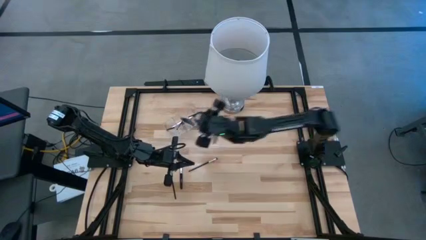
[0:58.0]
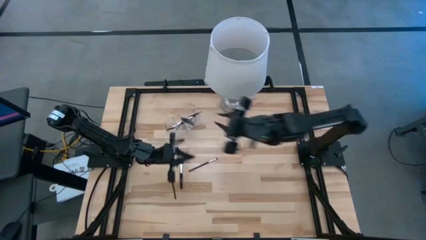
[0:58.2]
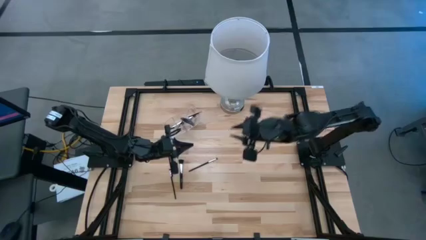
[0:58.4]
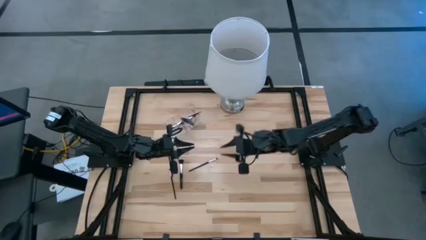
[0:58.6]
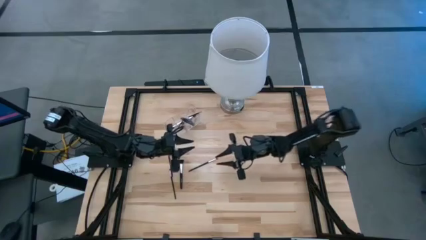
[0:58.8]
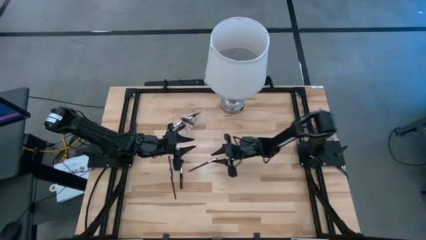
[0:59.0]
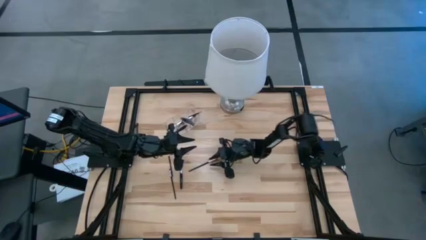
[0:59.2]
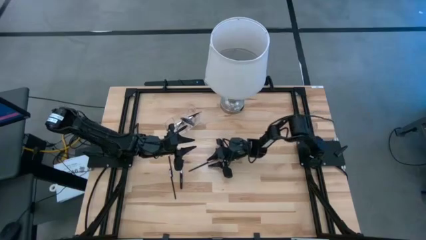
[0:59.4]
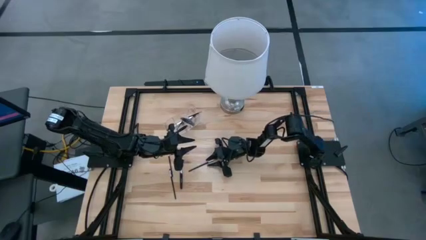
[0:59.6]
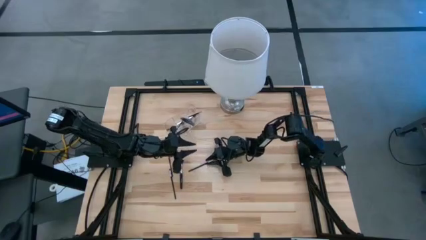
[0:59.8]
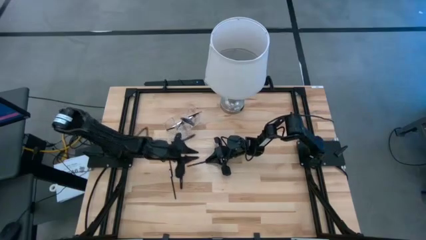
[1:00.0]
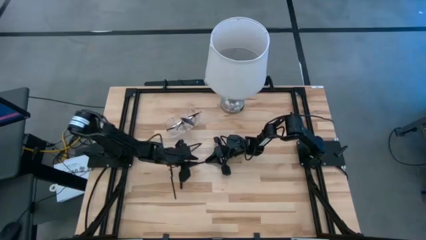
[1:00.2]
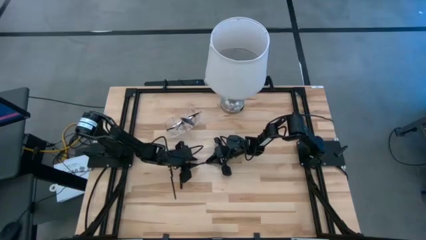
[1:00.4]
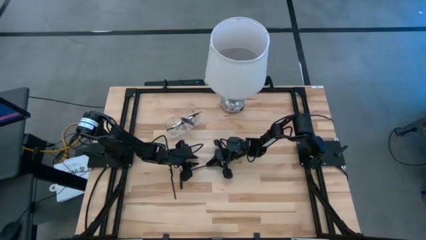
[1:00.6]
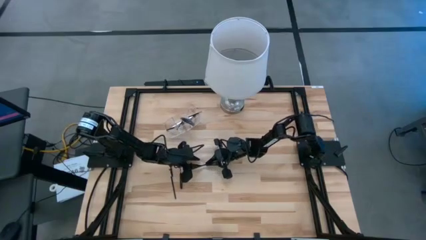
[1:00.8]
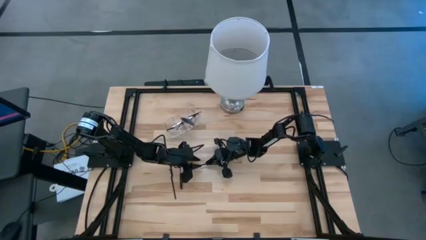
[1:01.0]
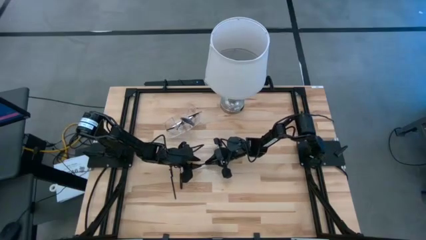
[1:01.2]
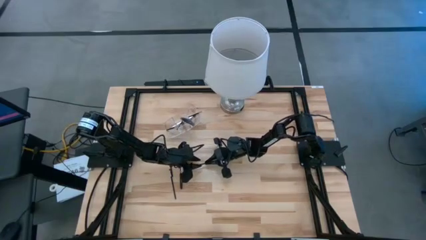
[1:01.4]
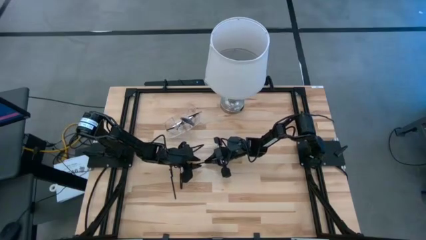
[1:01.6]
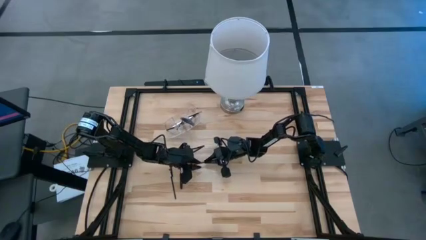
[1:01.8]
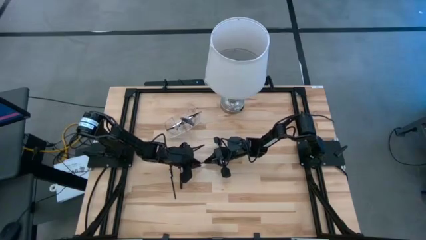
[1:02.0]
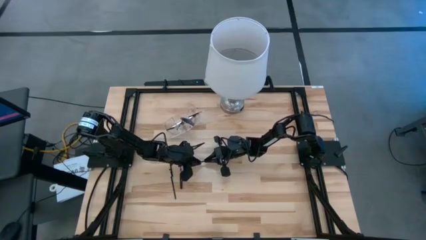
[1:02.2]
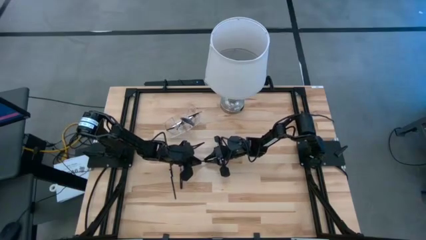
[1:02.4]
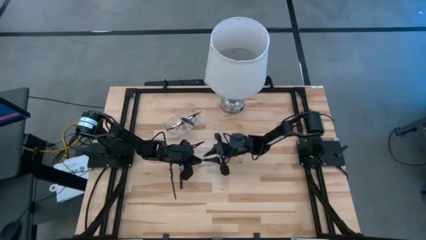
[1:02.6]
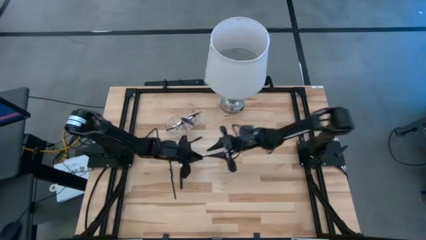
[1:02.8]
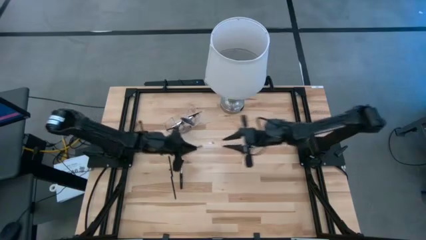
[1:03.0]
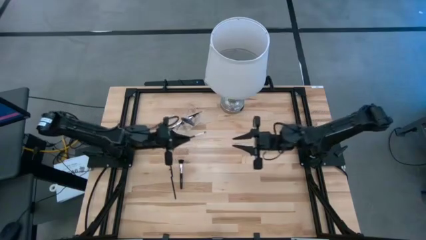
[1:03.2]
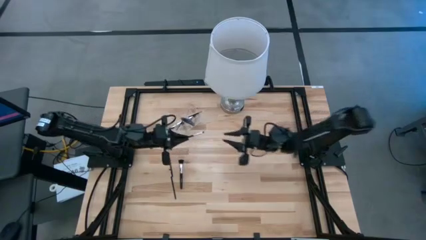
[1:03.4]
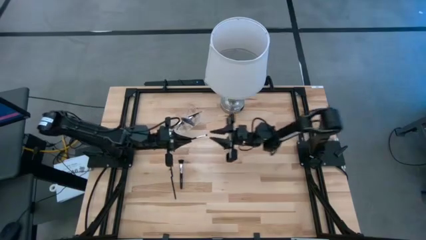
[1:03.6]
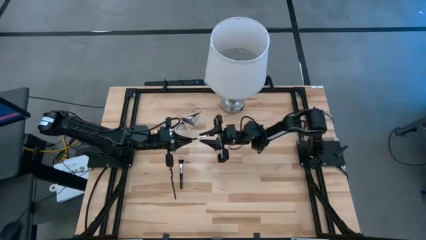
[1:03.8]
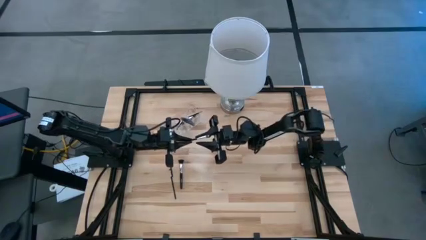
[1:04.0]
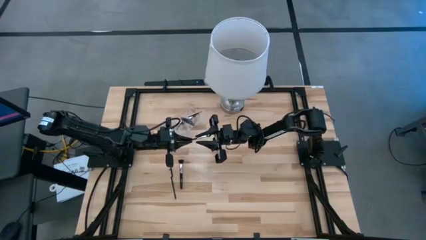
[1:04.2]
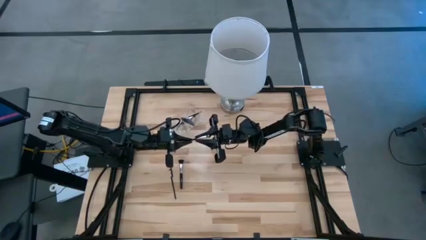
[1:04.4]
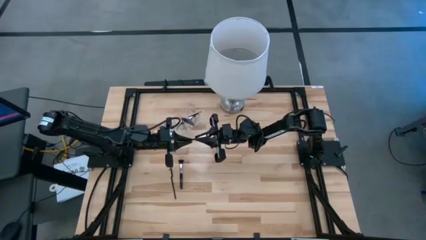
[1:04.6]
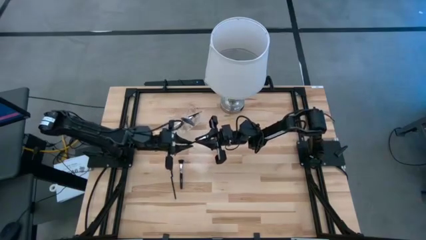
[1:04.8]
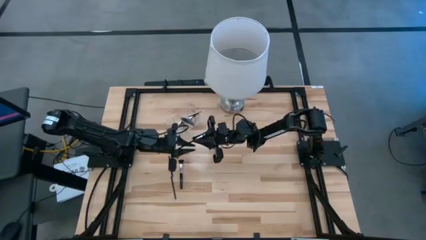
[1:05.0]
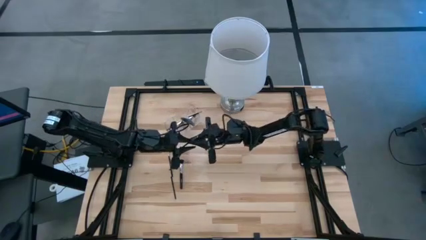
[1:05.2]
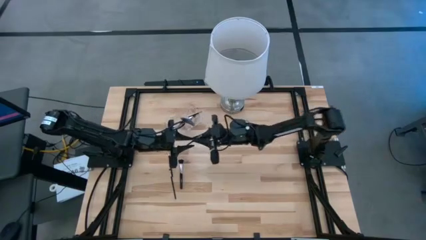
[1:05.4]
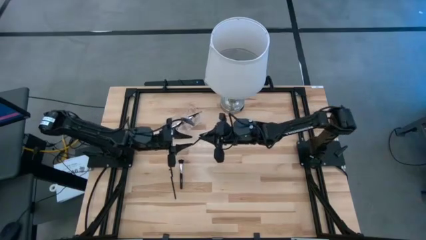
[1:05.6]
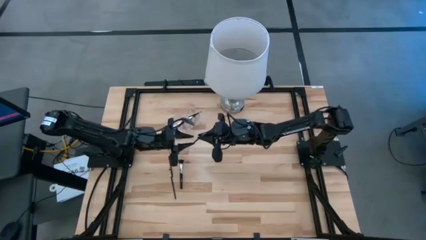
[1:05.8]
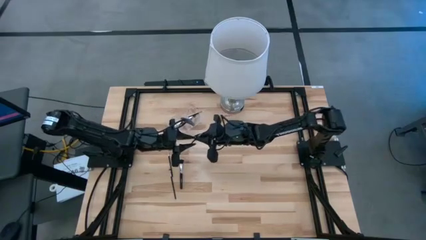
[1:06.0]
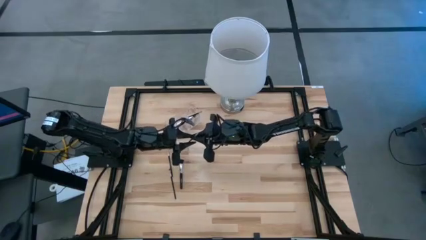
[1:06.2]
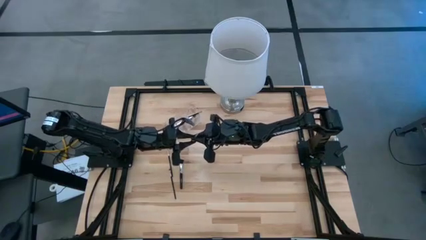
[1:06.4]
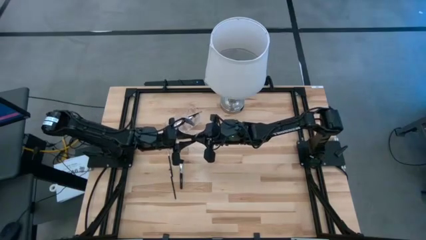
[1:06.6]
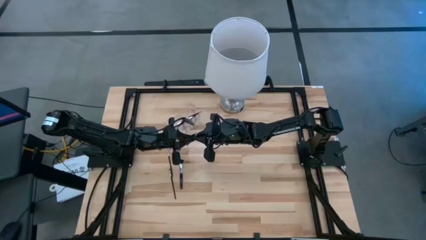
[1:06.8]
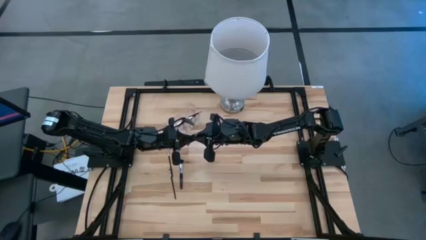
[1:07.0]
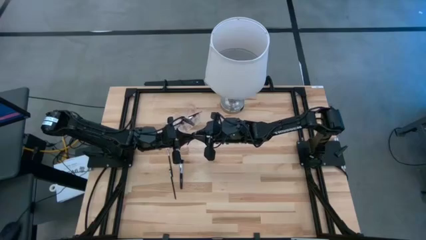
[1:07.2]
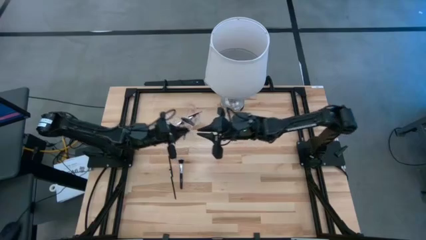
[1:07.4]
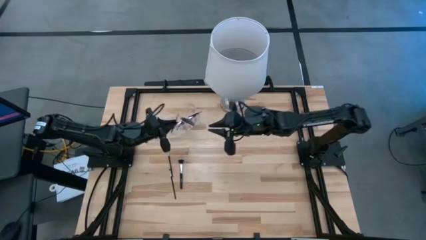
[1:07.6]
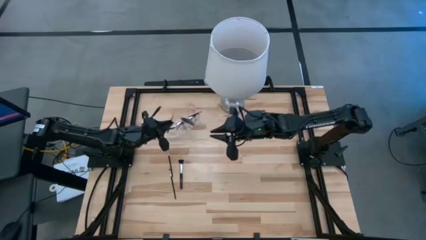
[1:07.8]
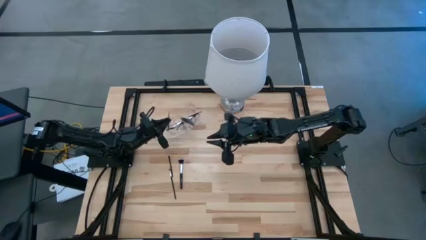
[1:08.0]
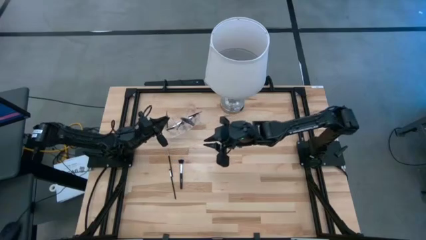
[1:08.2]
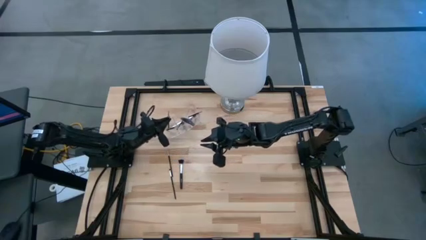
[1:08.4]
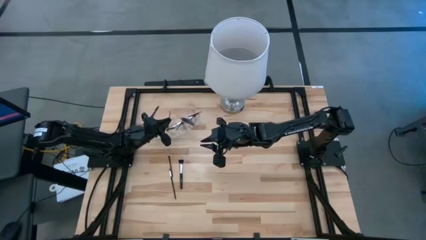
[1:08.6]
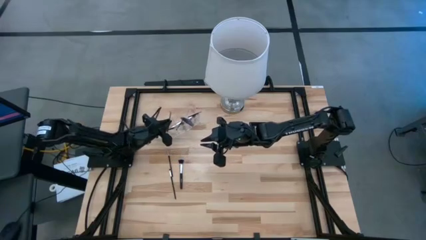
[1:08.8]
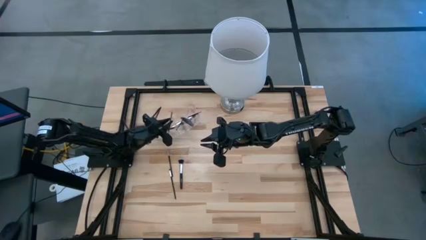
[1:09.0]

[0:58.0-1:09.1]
Task: Put items in baskets/containers
Put the black eyeshadow brush into the transparent organizer

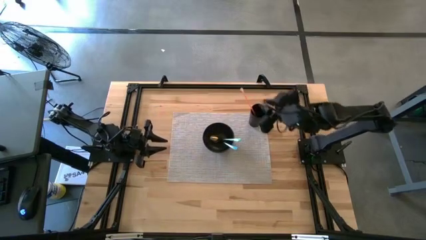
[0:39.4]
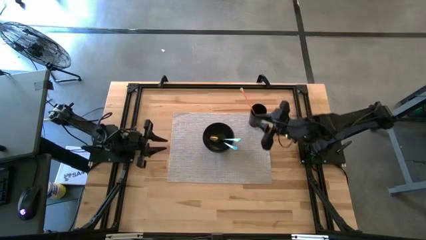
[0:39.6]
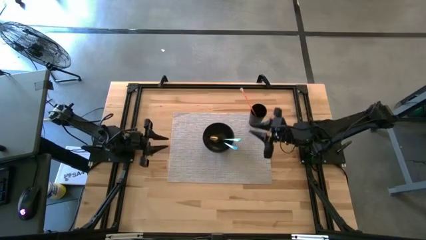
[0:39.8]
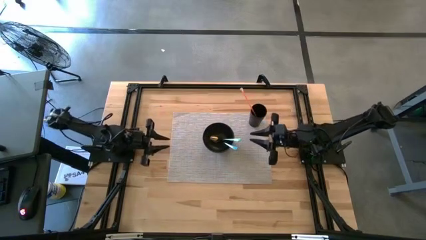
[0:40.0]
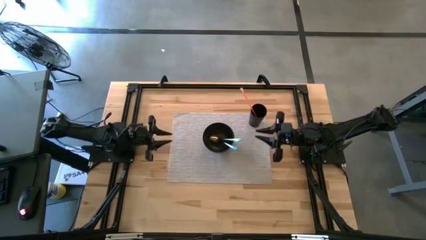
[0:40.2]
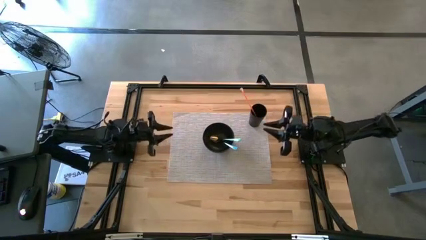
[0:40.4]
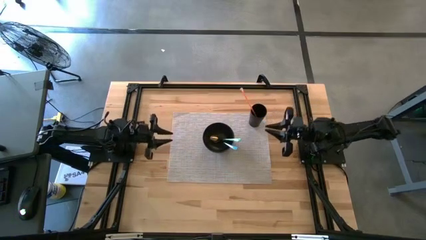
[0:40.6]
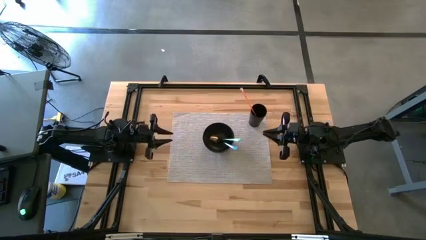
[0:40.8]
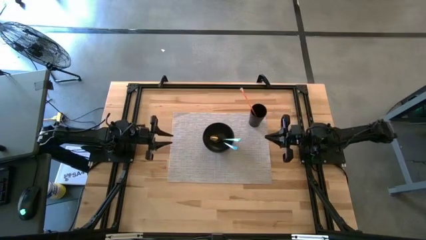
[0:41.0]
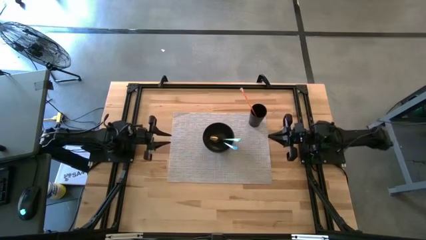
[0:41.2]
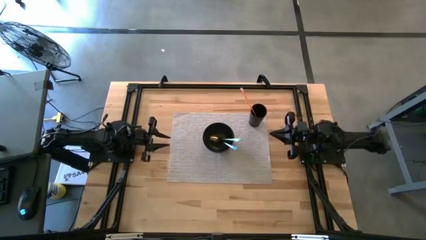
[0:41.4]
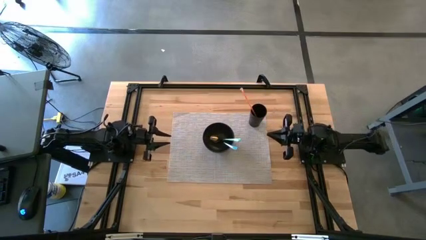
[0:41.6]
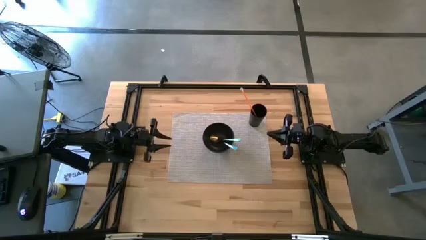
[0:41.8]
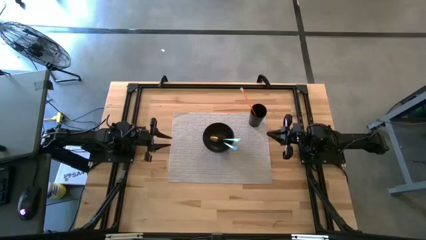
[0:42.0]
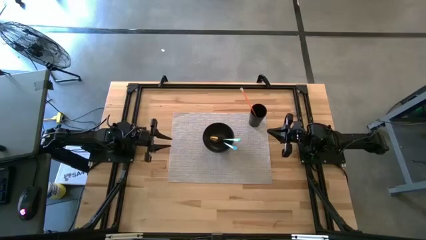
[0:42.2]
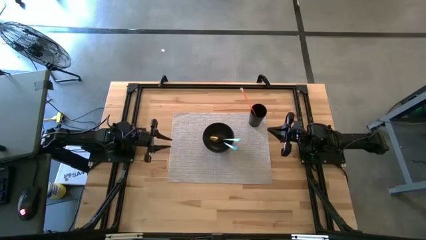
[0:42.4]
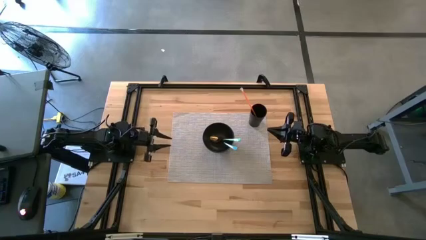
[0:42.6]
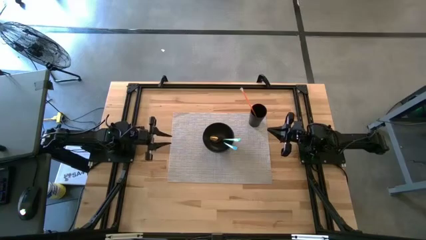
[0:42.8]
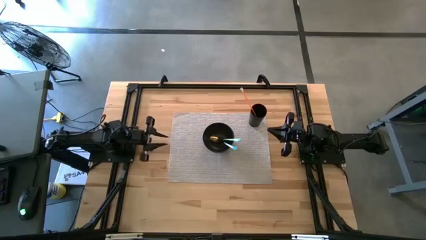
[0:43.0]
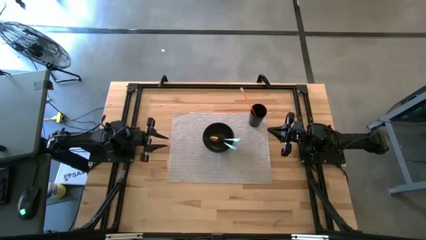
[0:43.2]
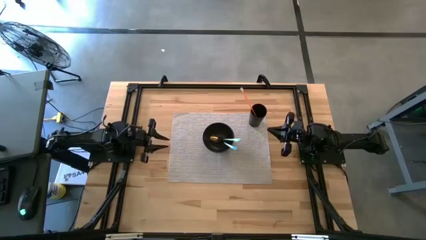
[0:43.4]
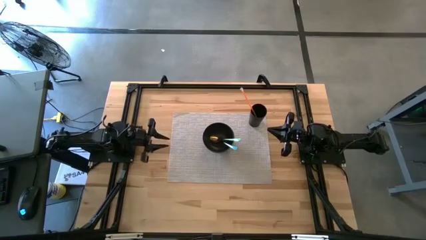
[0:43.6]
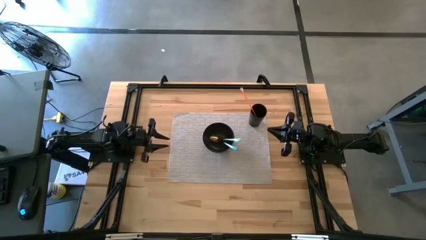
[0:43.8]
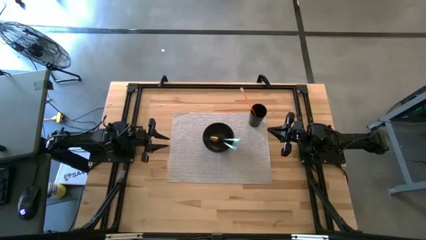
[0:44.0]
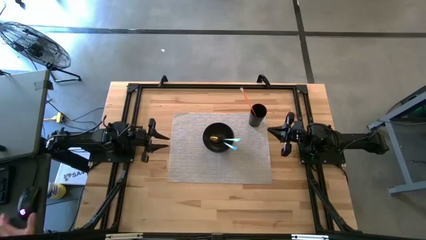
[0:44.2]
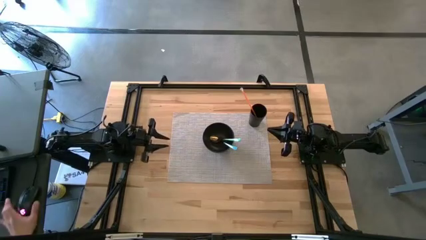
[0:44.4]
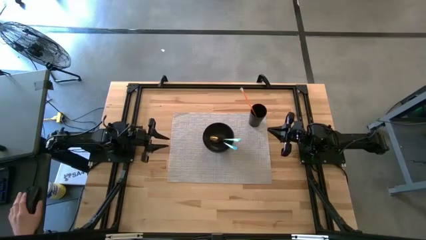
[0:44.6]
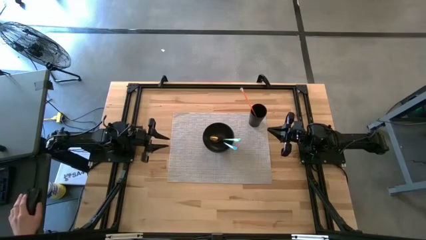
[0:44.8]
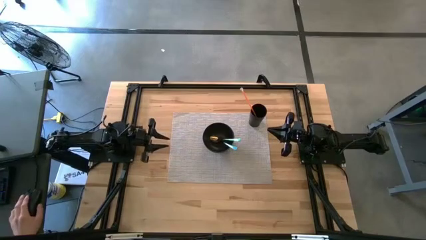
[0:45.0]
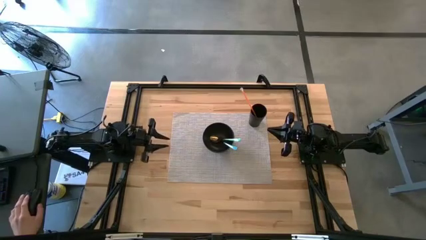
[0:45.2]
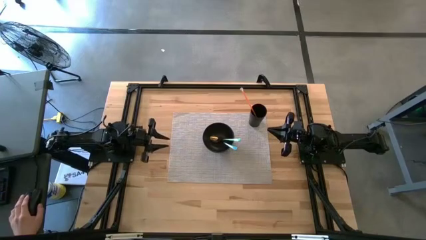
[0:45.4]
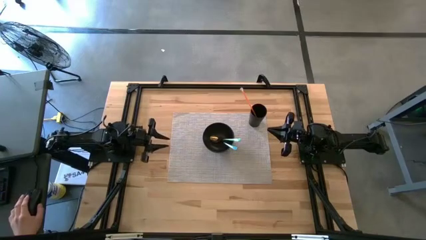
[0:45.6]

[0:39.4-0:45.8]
Task: Pick & Place Utensil
Return to Home Position
